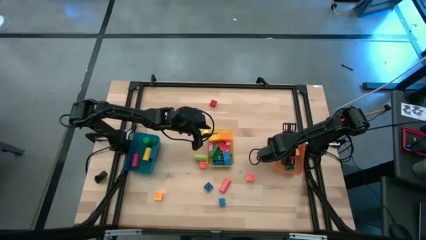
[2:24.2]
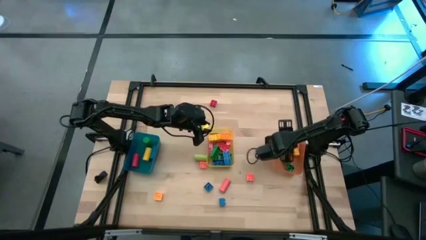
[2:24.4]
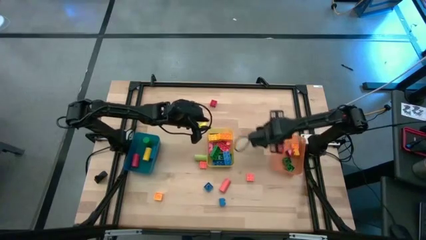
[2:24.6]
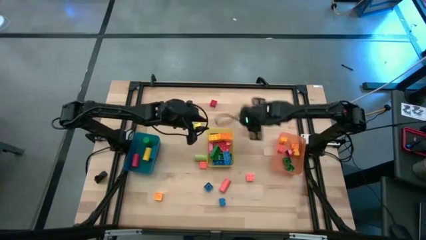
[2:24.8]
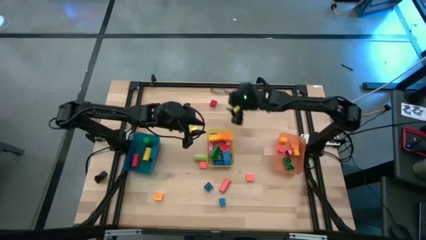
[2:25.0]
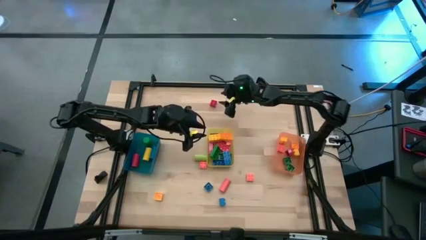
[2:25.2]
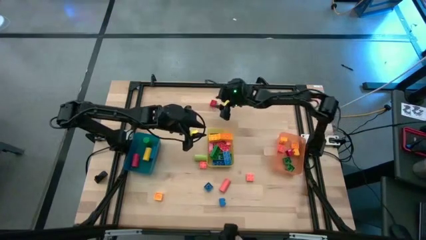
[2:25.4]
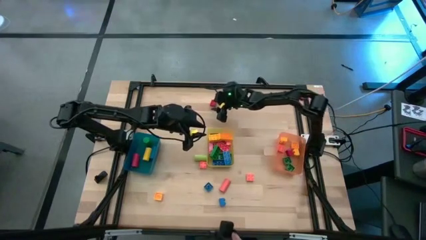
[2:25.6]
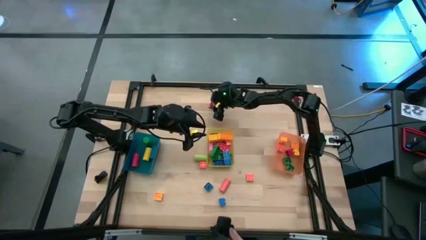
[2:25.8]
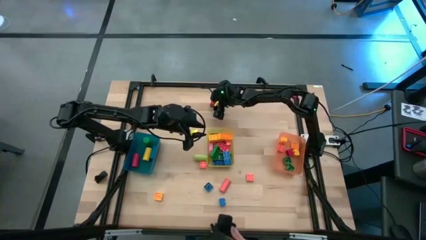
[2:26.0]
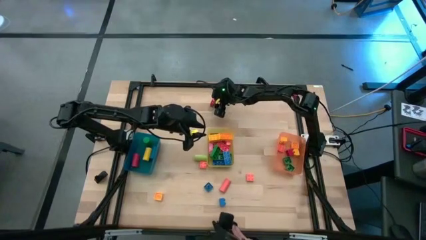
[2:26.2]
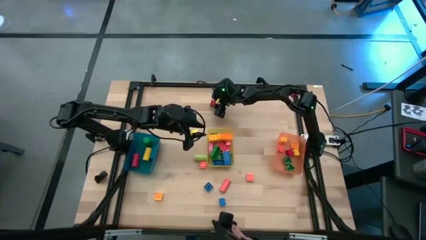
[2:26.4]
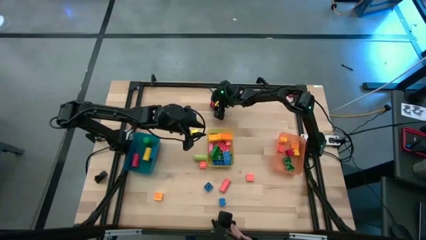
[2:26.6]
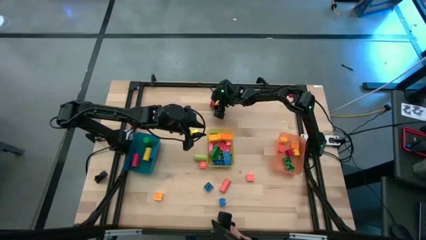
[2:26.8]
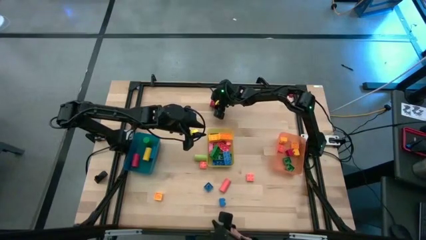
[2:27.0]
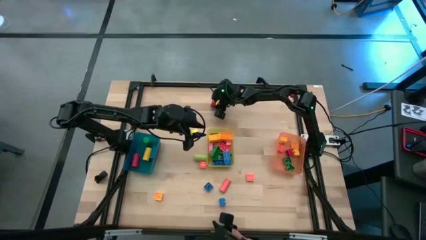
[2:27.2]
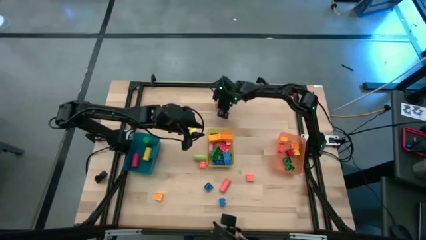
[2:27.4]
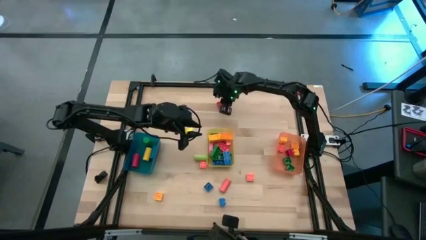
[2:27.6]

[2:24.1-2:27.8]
Task: Sort blocks by size
Put the red 4 stud game piece into the orange bin

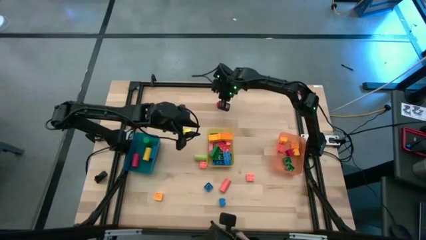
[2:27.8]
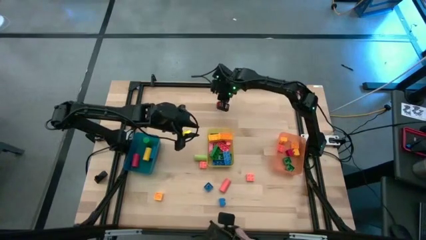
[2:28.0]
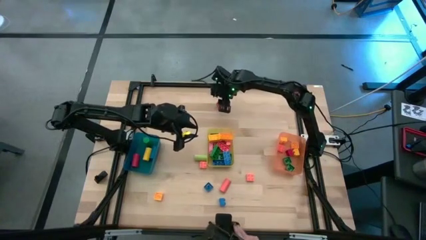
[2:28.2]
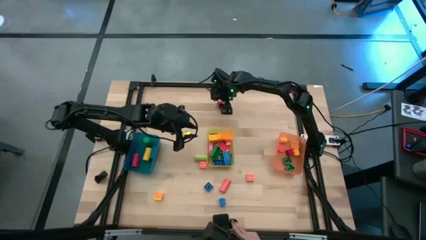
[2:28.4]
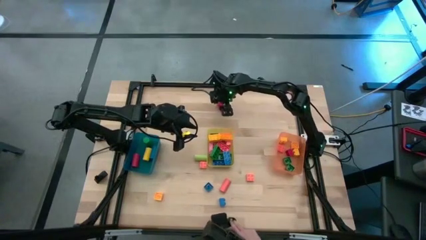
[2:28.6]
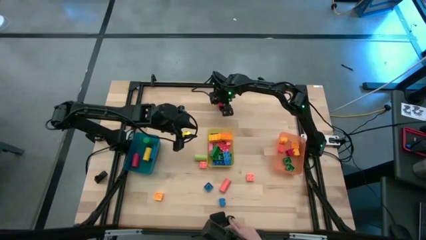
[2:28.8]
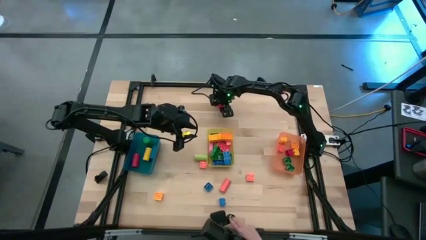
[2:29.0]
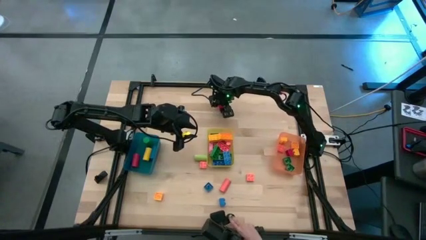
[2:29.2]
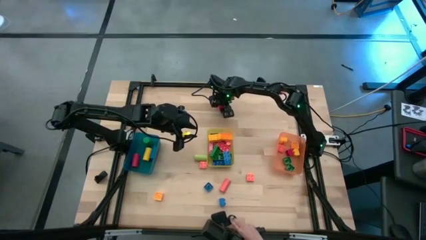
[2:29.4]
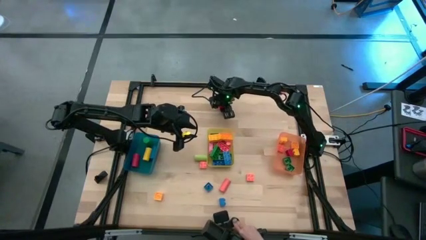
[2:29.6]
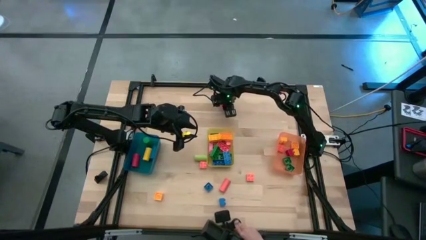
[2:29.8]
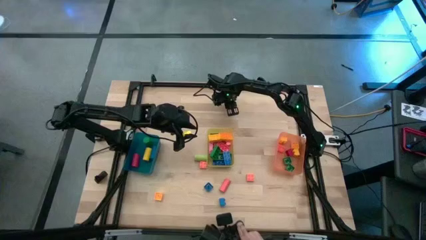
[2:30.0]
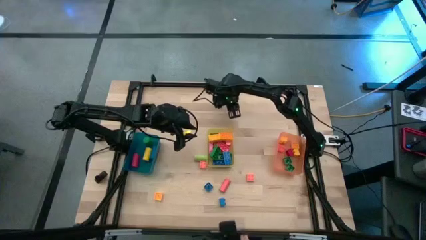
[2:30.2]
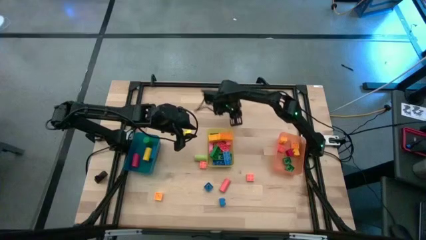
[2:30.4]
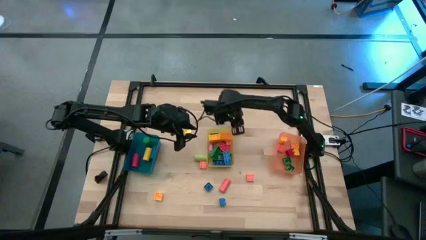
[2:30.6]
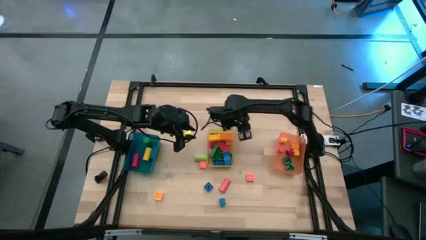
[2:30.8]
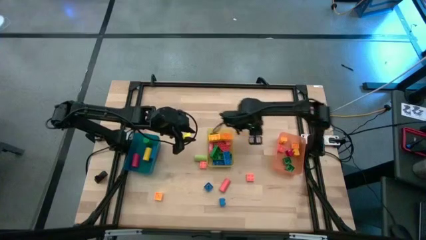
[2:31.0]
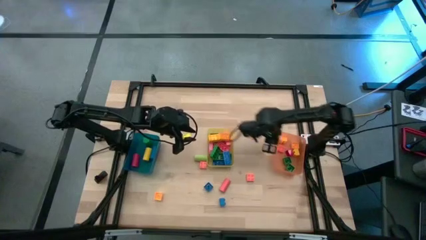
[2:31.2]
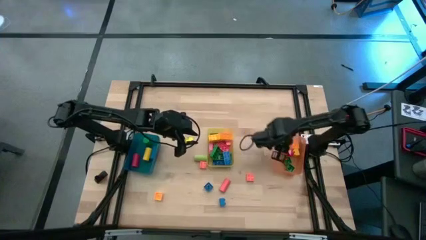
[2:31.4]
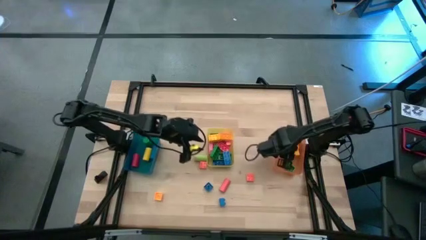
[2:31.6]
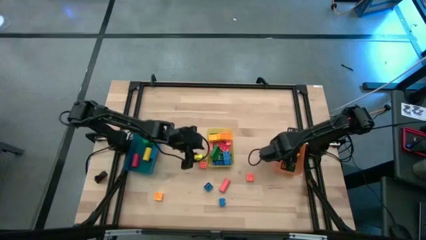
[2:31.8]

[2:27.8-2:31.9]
Put the red 4 stud game piece into the orange bin

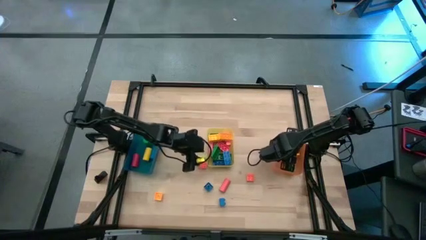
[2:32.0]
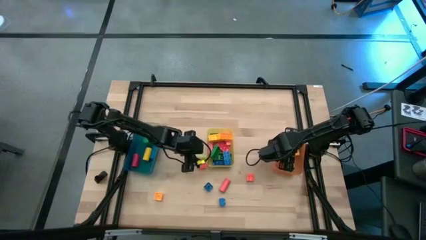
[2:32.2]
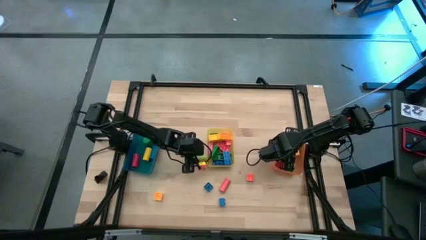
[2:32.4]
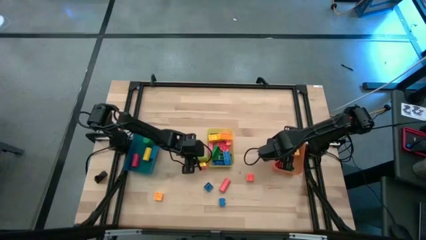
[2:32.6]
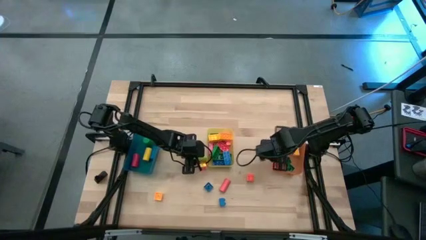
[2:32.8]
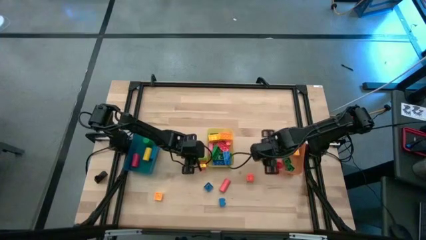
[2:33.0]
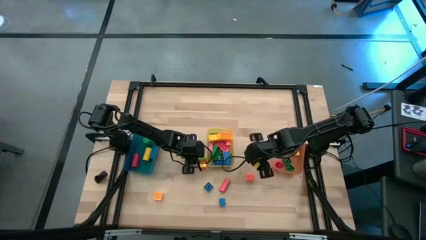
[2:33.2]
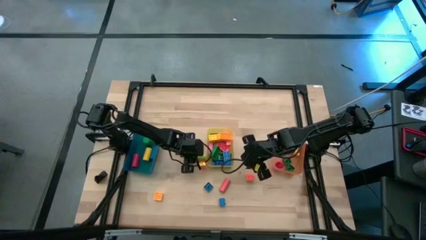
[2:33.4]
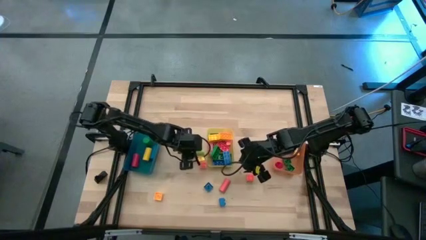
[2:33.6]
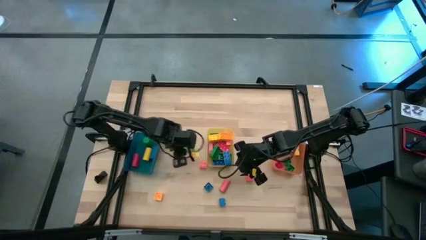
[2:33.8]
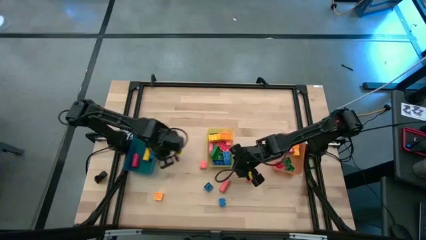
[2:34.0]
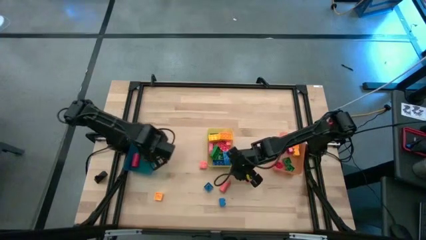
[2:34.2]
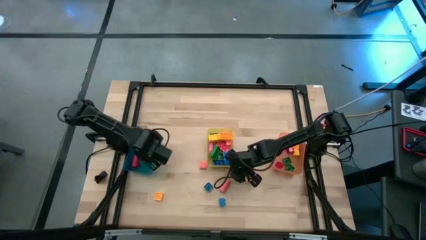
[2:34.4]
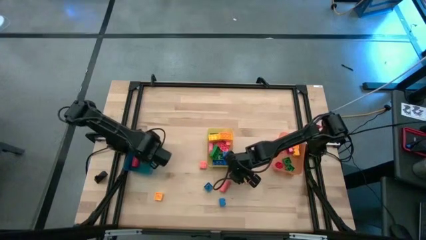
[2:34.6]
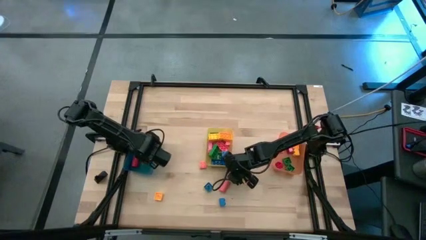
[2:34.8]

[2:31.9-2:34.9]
Put the light green cylindrical block into the blue bin

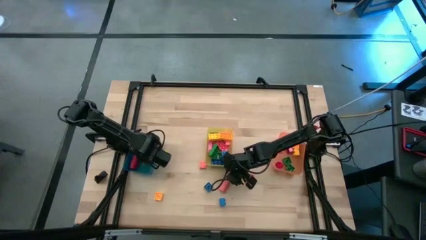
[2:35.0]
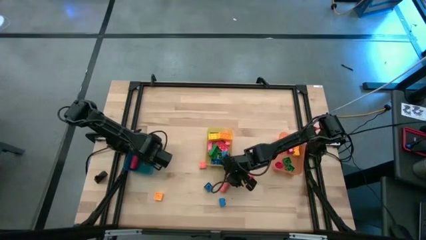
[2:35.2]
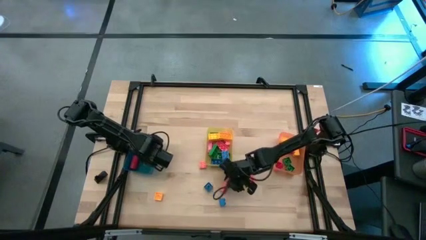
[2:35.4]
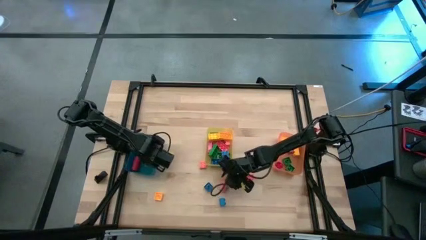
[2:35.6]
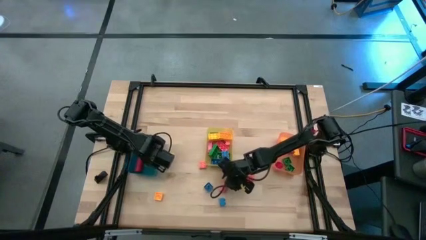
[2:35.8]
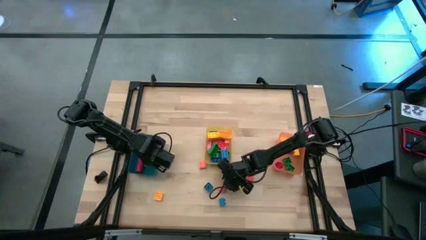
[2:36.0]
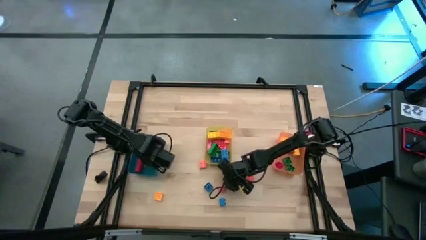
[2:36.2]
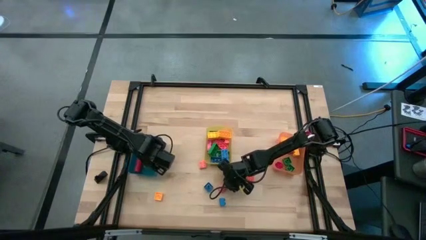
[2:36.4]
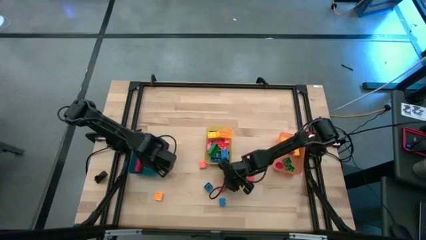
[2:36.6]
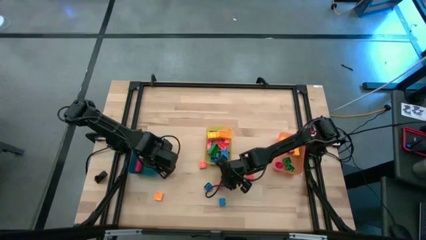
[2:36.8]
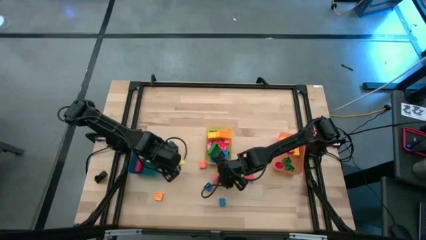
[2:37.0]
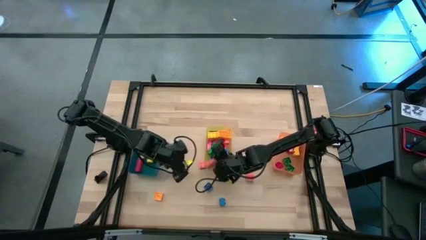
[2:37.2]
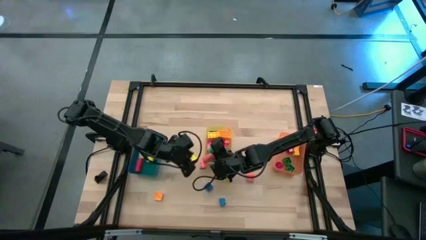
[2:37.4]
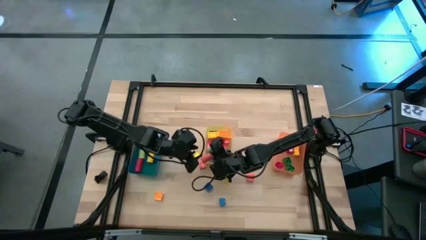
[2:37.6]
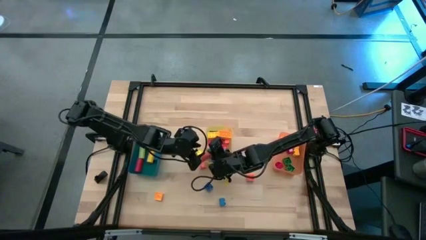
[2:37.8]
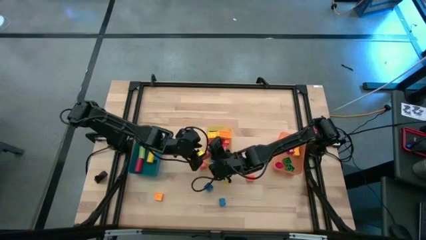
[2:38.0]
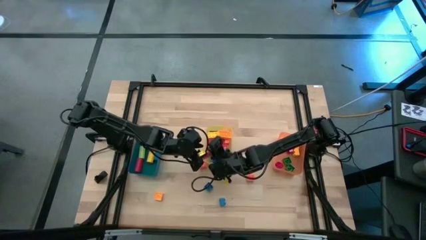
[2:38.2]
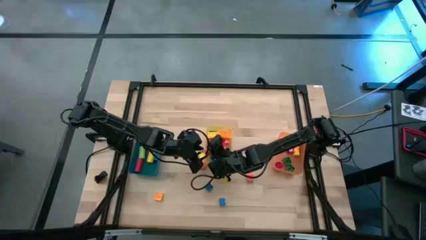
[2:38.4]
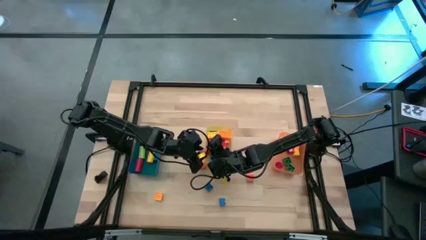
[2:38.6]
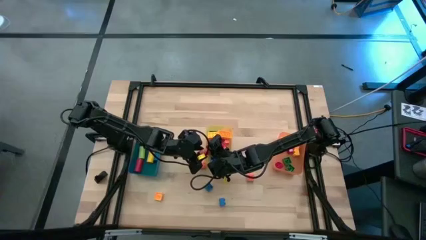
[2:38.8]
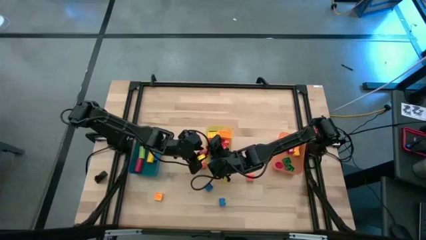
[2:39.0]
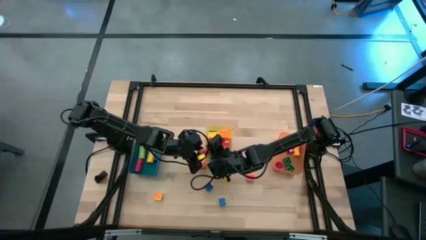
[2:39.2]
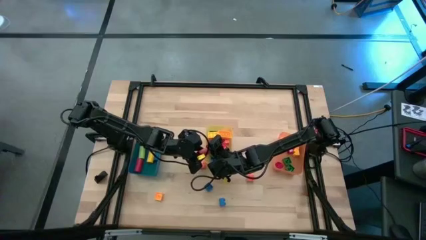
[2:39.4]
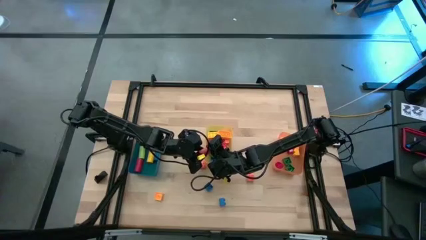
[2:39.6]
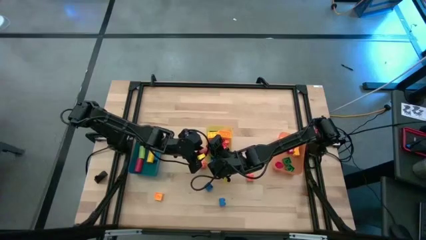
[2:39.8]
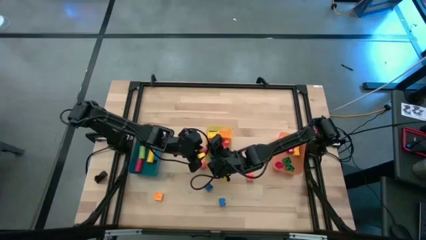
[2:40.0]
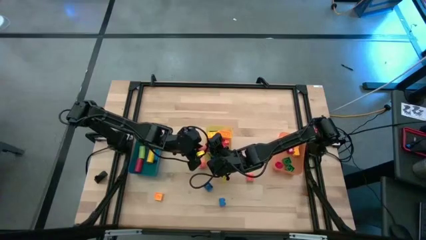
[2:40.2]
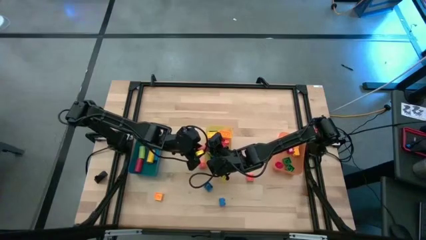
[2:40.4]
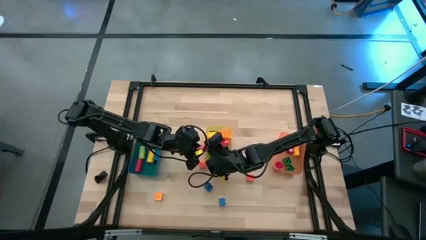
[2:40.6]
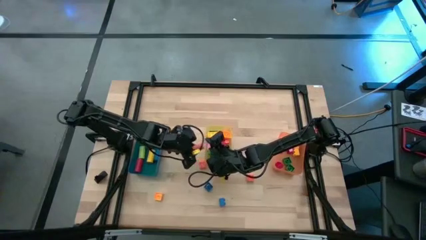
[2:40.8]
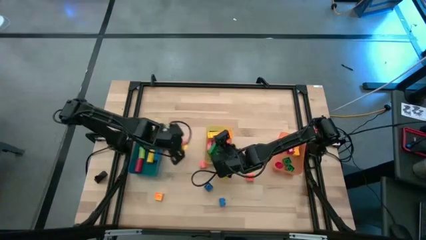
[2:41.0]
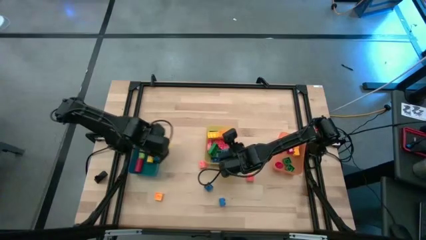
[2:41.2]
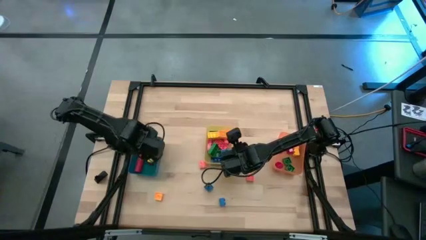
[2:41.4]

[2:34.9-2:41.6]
Put the orange cylindrical block into the blue bin
